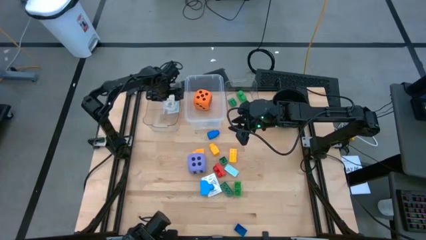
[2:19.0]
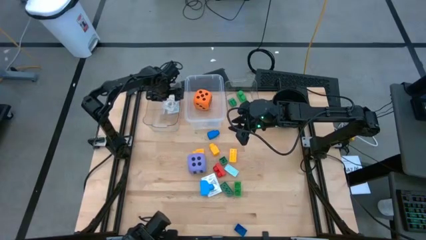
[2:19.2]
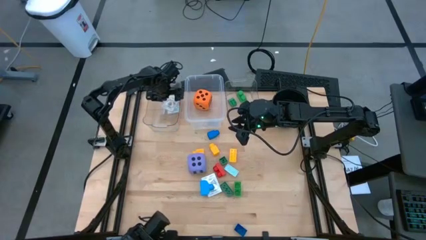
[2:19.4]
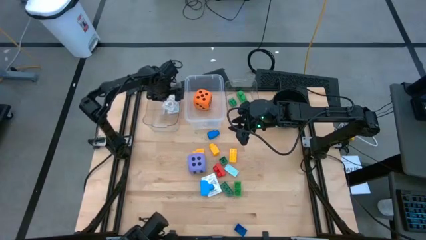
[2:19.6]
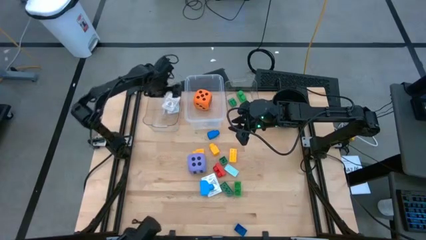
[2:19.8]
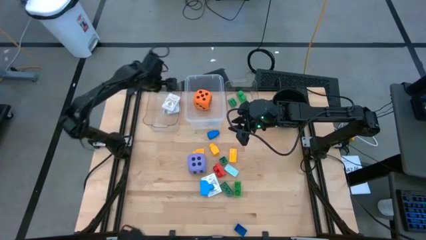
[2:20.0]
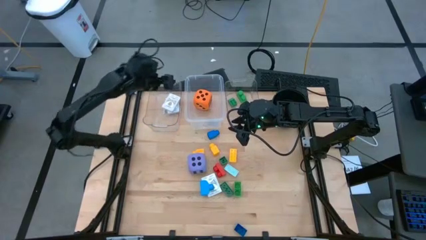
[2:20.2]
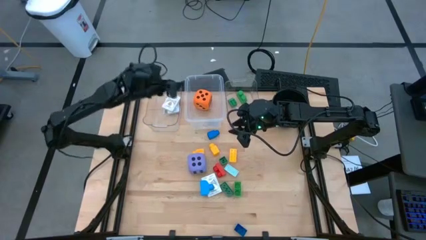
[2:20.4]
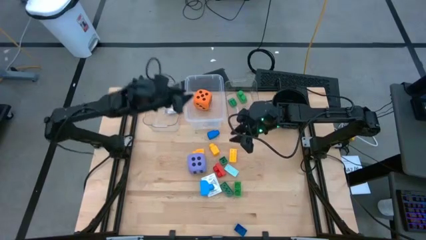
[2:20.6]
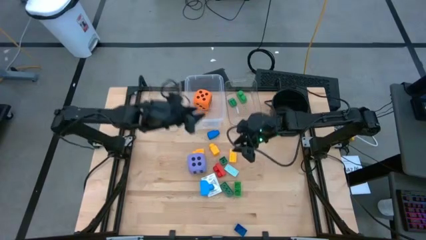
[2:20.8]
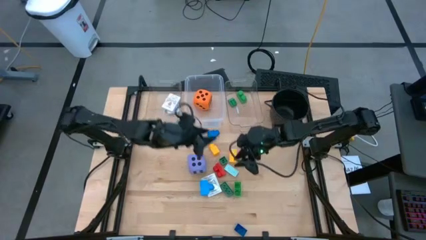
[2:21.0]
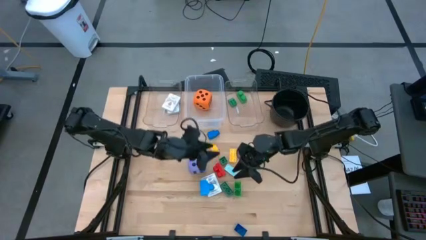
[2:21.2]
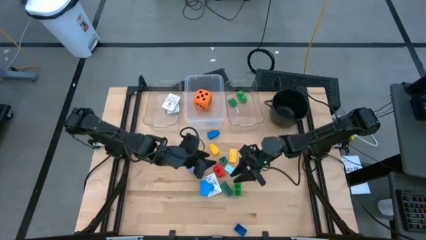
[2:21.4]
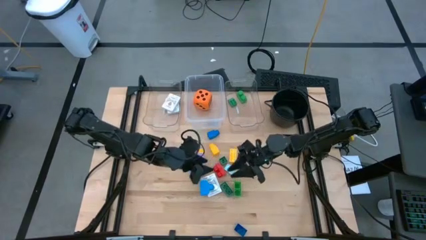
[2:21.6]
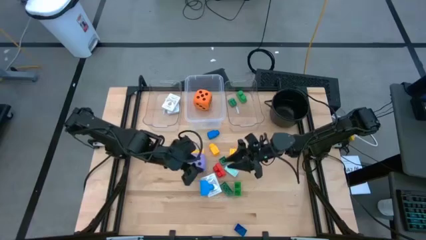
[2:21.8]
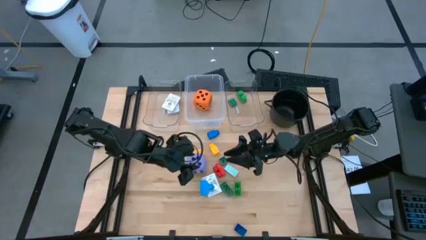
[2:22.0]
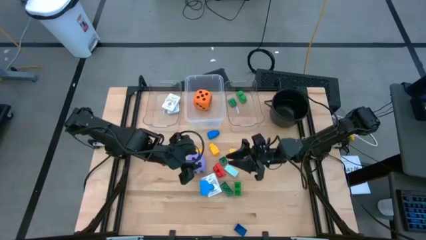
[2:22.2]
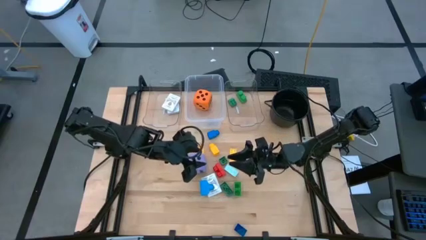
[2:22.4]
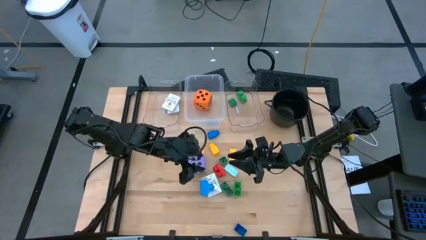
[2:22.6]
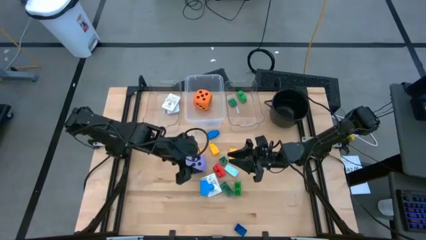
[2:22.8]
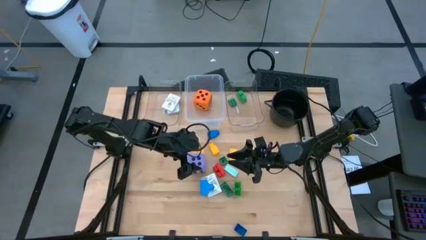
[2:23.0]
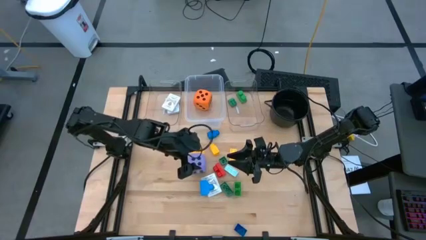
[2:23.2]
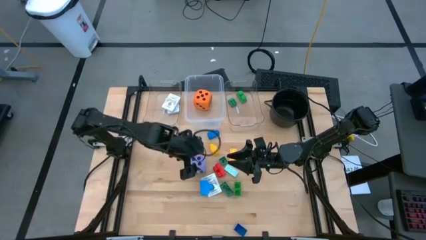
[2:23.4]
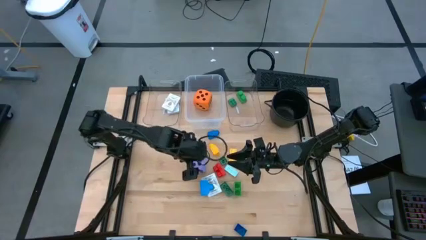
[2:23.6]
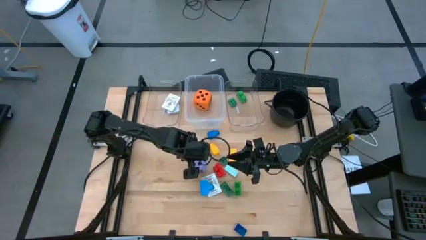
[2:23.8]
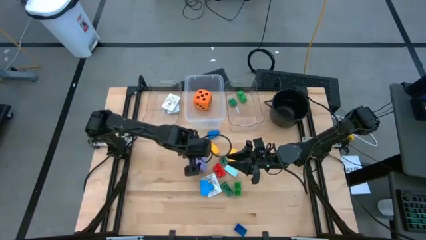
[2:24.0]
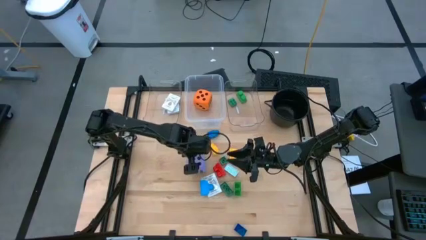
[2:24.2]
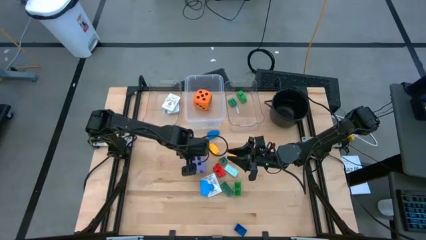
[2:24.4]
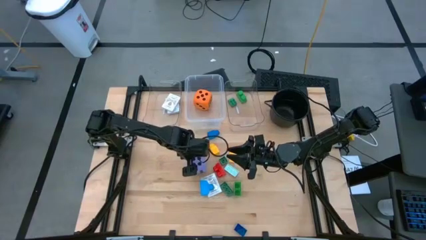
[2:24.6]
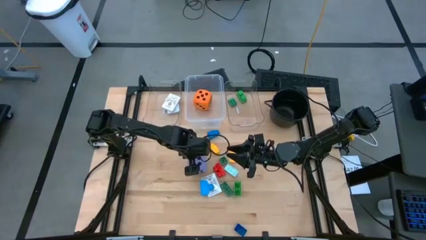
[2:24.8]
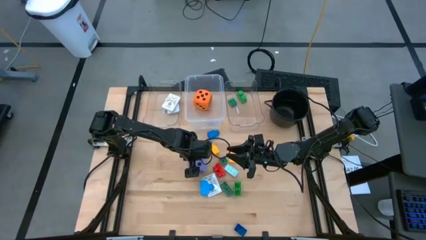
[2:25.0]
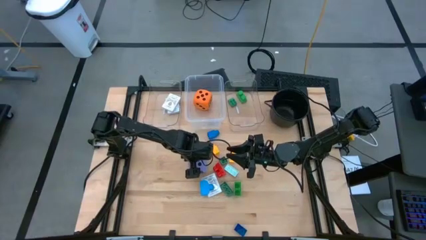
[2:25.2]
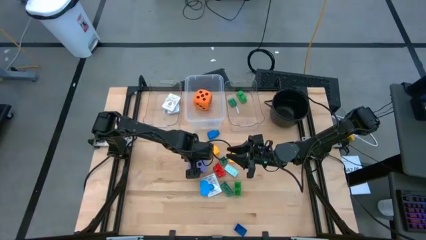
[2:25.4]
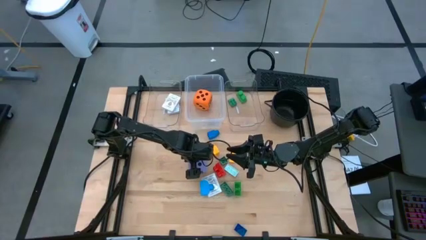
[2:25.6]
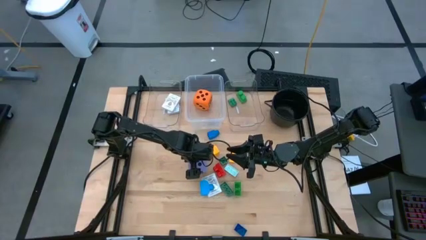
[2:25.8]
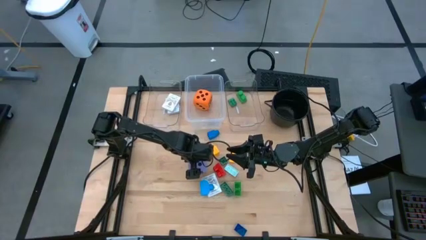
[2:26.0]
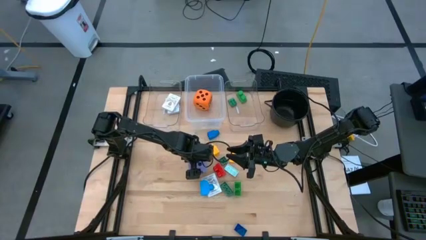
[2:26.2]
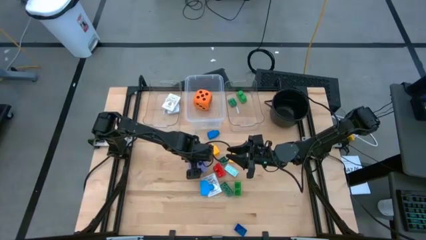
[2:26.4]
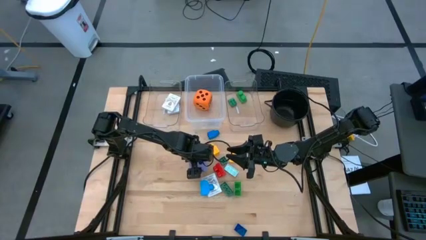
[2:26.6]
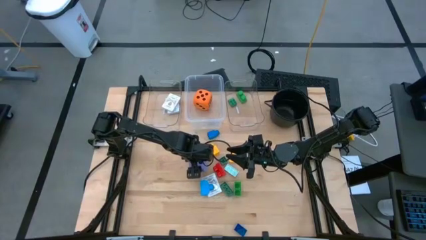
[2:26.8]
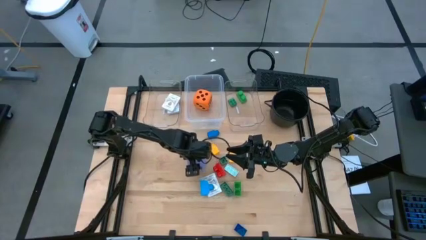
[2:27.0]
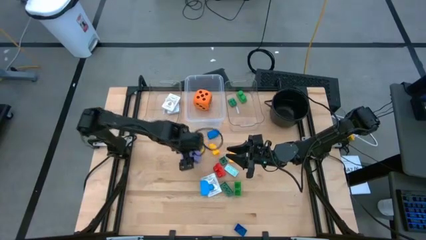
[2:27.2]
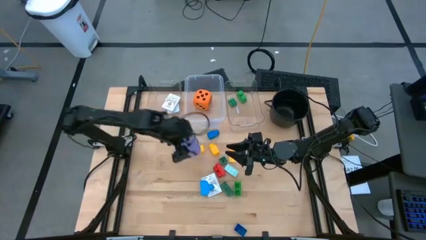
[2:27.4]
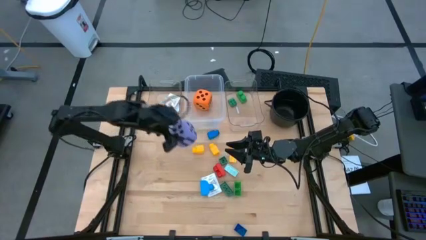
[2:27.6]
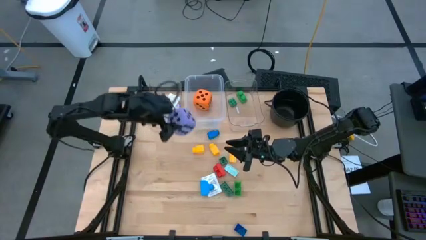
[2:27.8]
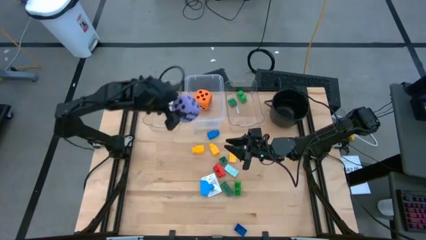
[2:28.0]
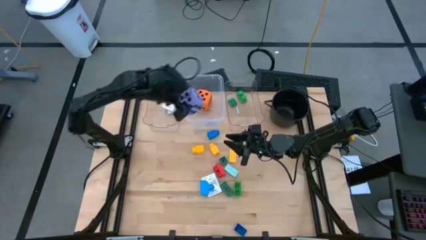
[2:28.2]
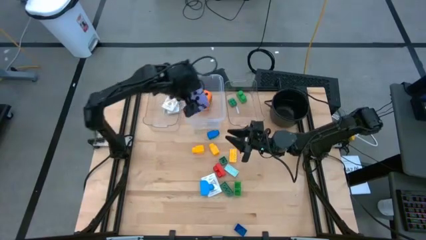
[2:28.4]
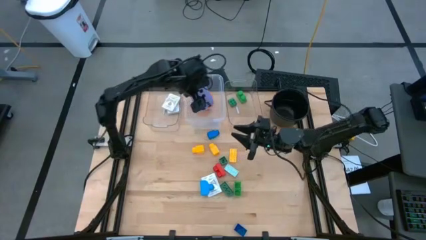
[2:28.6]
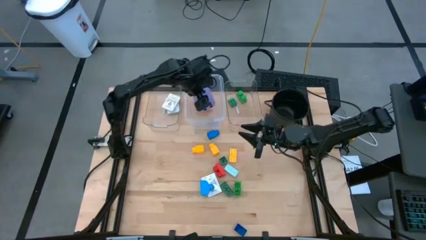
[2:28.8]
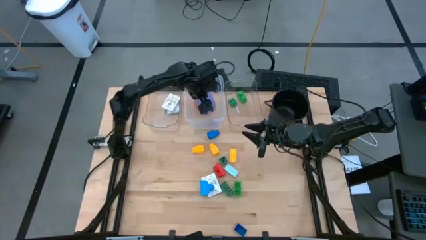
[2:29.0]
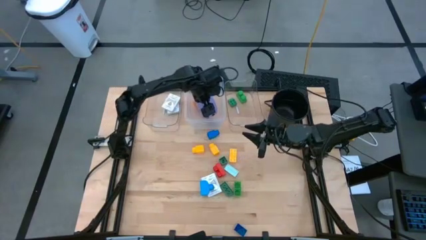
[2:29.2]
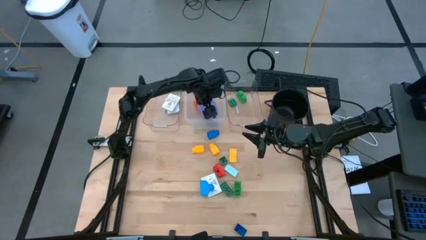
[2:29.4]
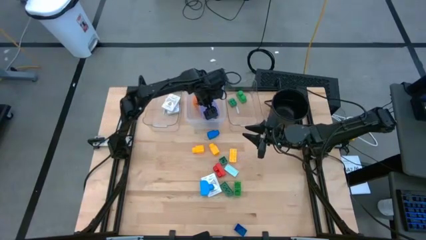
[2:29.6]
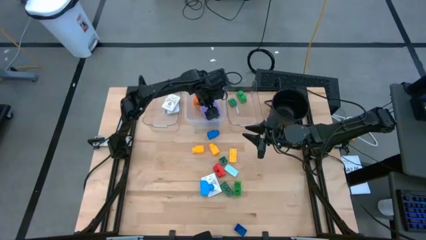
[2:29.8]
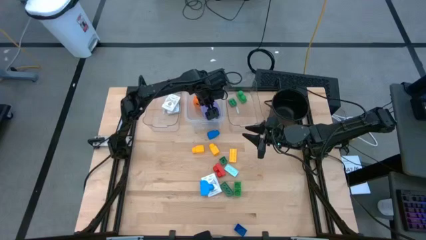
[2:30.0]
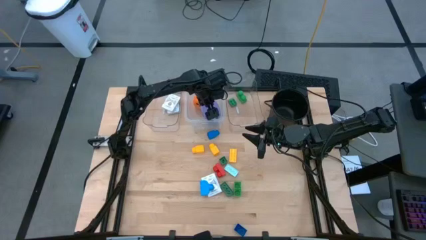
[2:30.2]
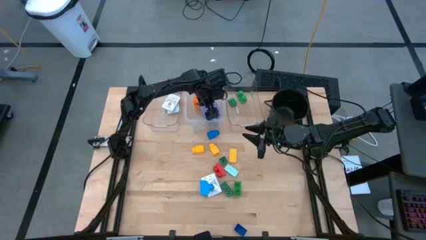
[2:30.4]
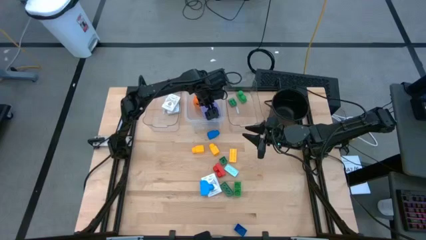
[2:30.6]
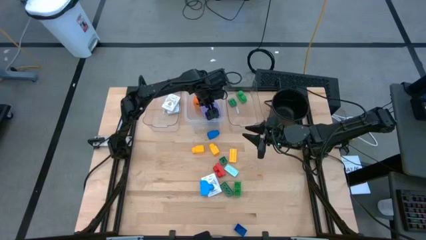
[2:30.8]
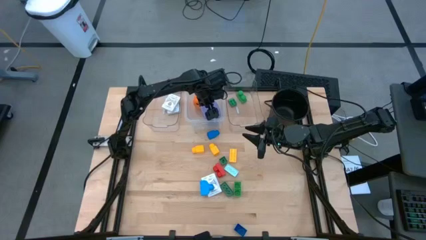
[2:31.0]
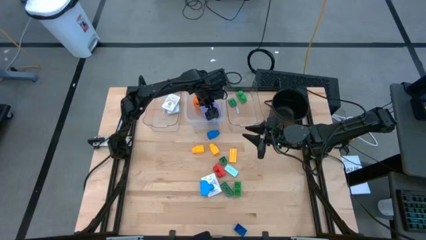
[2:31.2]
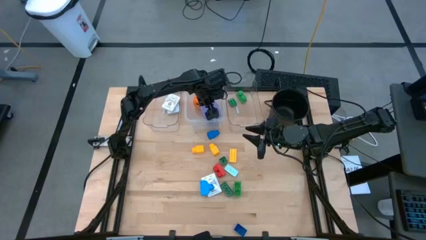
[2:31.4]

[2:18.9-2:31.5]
Task: Pick & Place Toys
Put the purple dice into the transparent container
